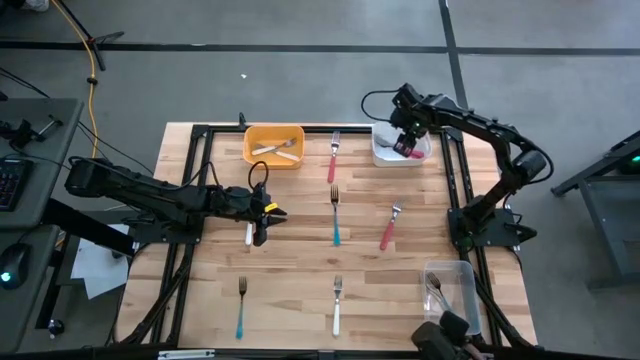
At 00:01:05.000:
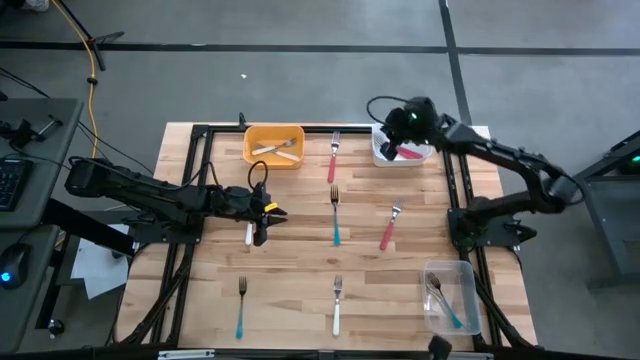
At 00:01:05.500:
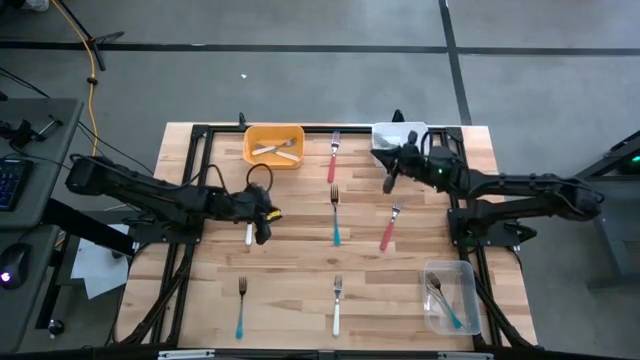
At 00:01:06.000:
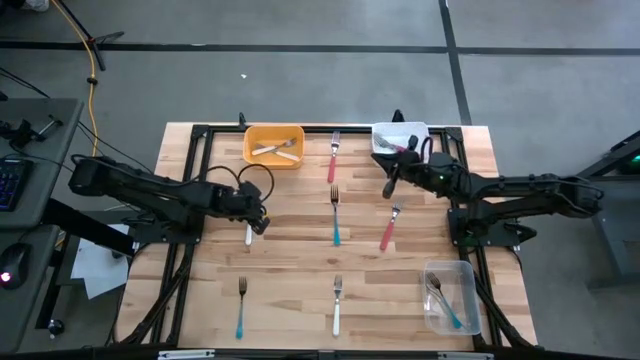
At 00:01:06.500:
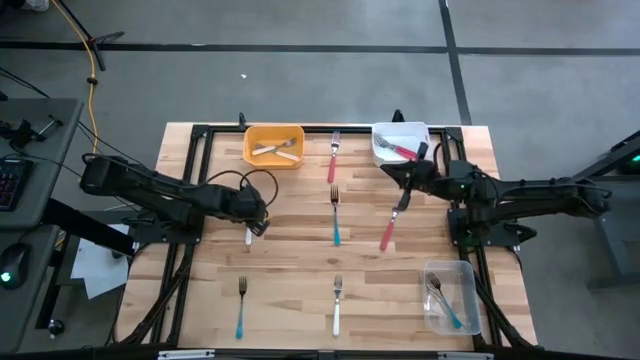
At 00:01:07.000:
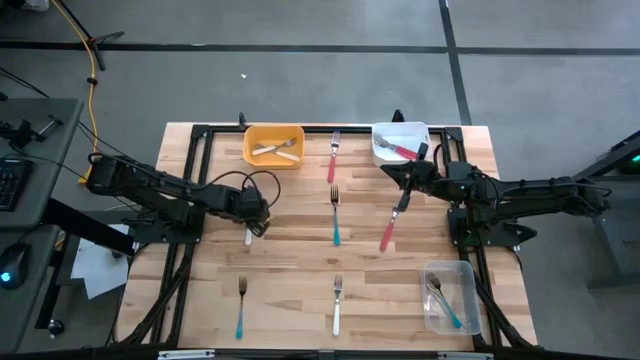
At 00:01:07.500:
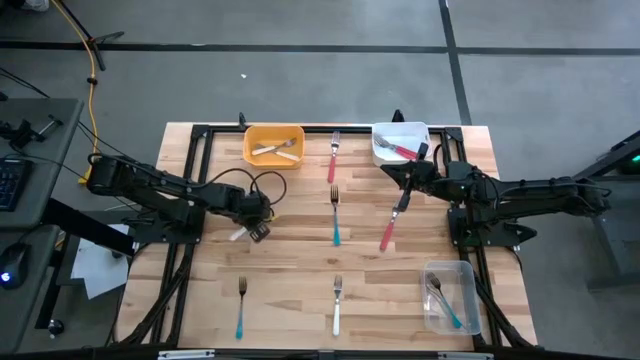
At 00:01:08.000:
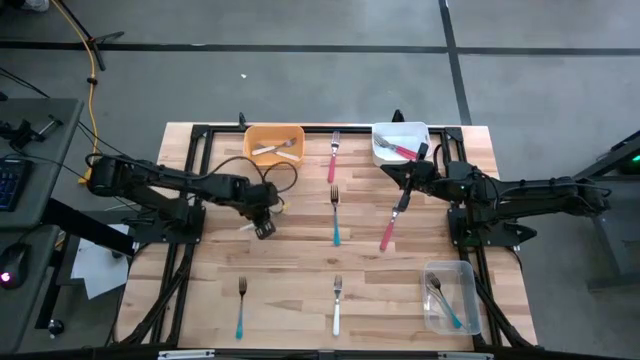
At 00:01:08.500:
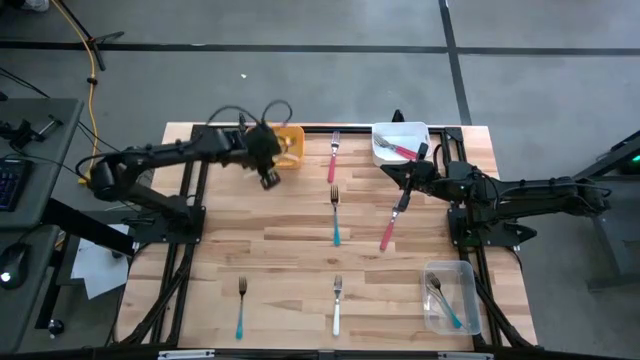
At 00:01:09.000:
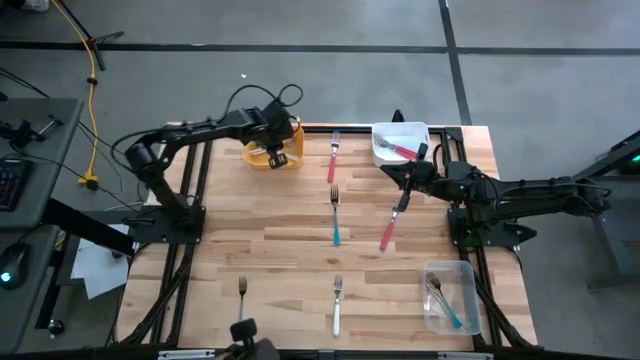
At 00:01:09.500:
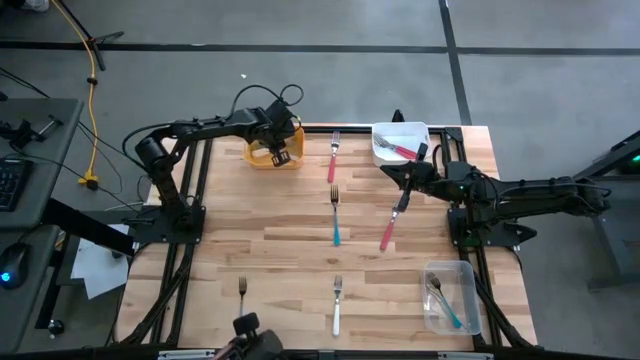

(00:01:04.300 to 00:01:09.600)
Task: Sort silverware by color (type)
Put the top white fork into the yellow bin

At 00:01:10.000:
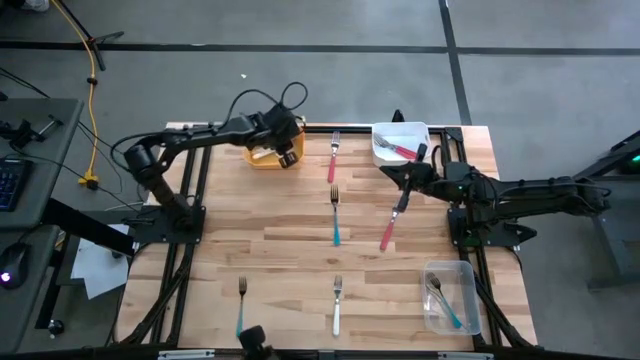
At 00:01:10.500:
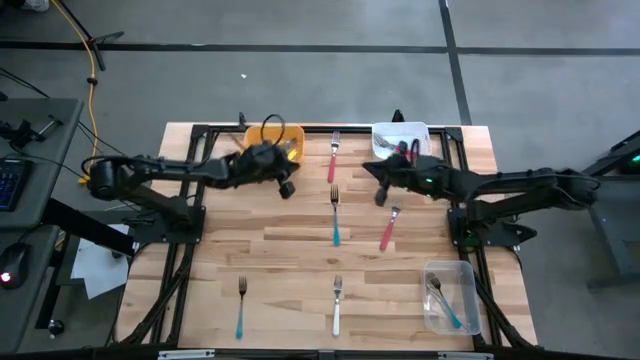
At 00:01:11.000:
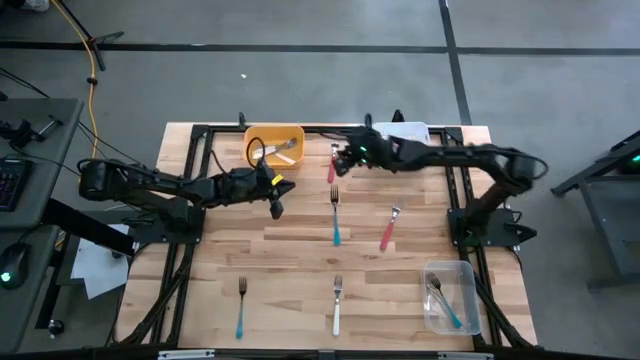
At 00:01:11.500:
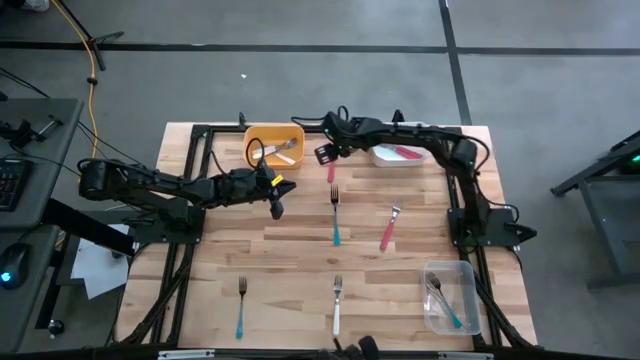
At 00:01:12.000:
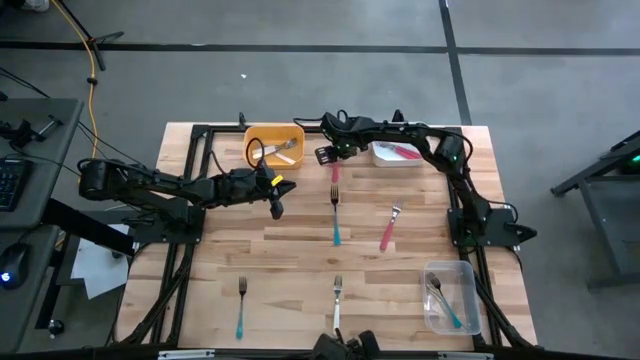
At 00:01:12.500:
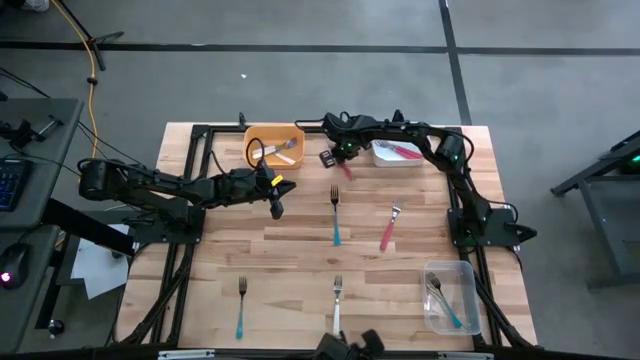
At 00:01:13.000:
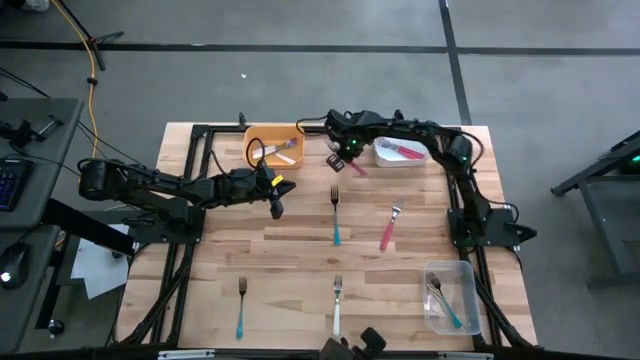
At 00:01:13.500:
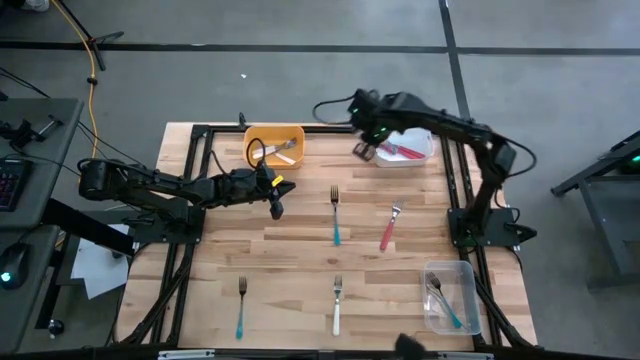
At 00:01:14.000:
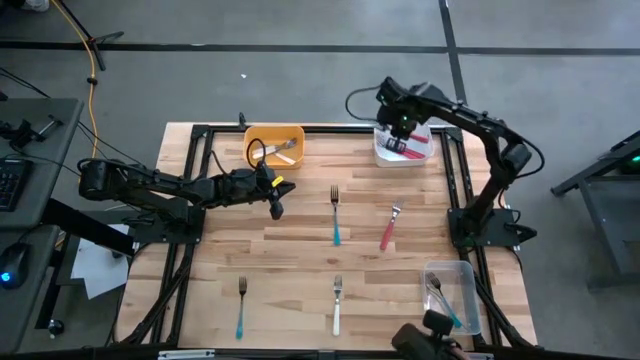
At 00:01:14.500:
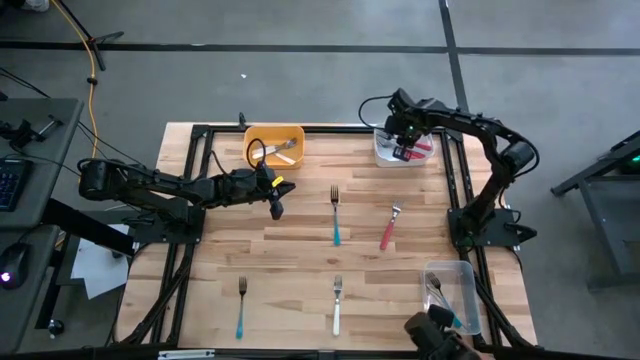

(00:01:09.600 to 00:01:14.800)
Put the top pink fork into the white bin

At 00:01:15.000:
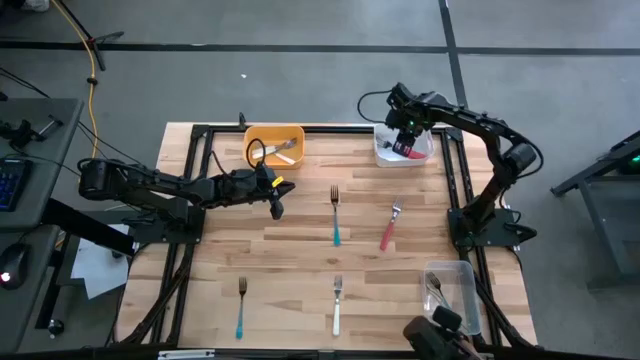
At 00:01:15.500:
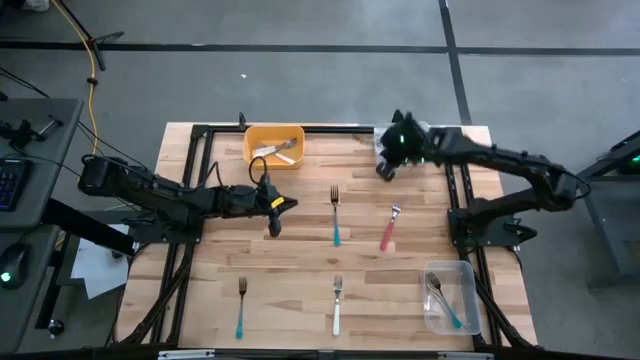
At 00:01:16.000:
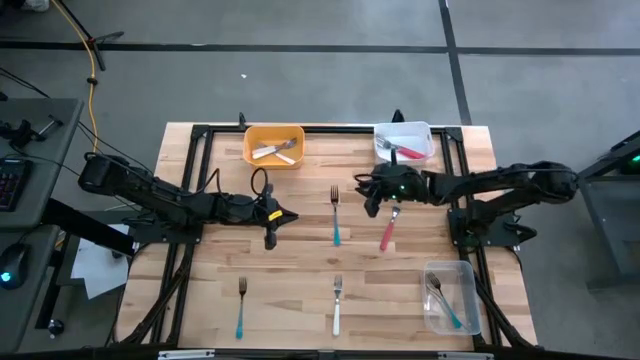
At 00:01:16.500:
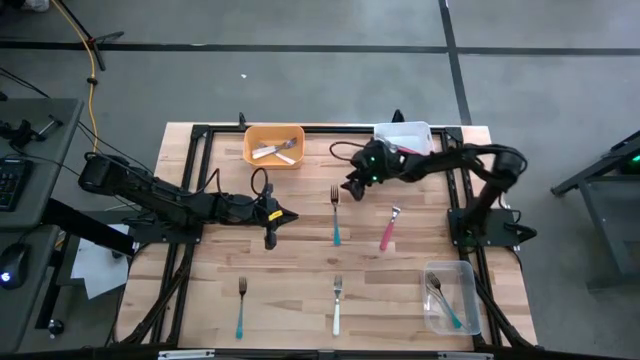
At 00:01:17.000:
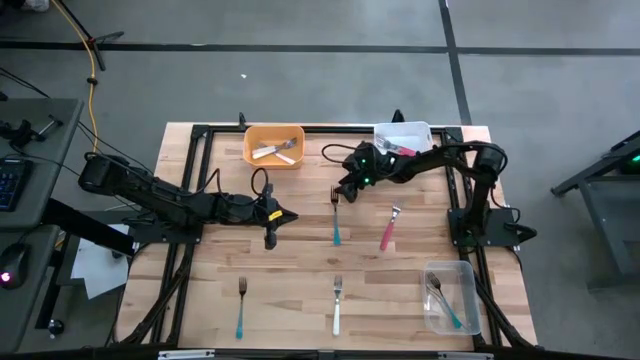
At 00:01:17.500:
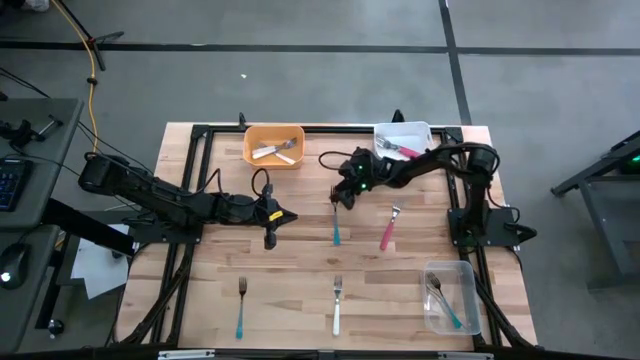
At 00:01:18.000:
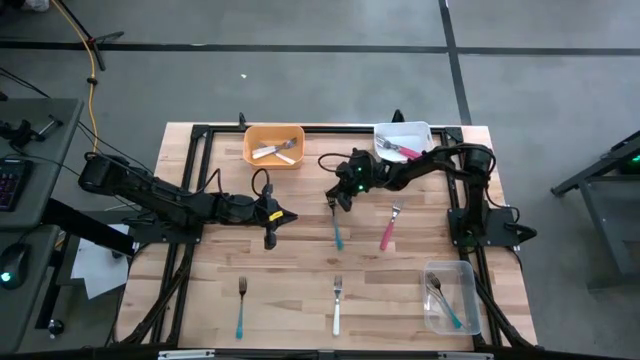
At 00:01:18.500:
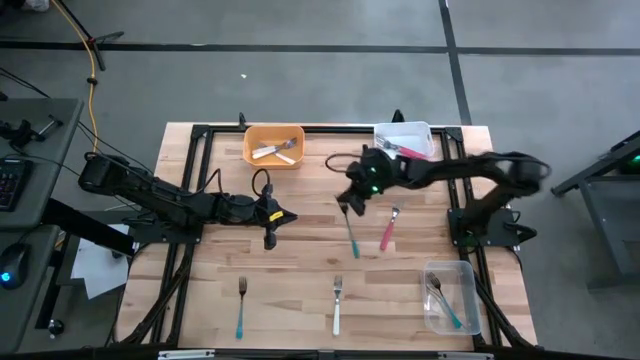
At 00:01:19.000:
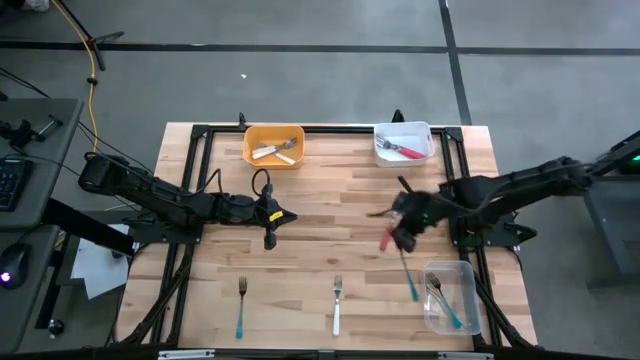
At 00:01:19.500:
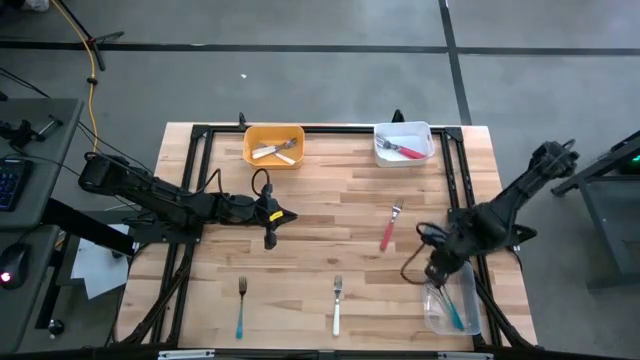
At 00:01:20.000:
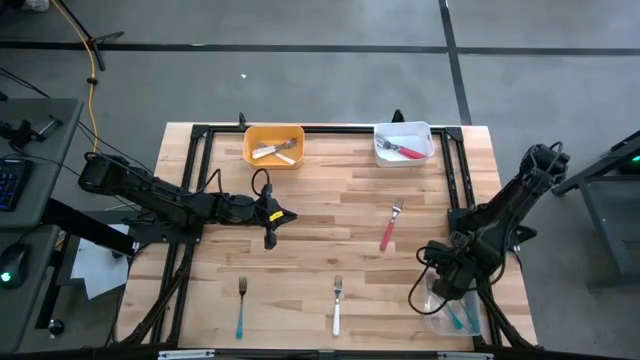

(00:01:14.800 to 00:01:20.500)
Put the top blue fork into the transparent bin

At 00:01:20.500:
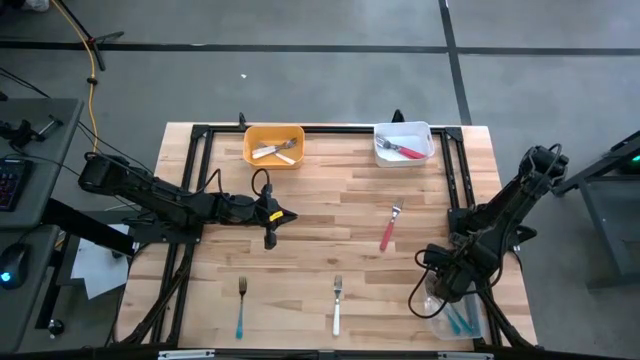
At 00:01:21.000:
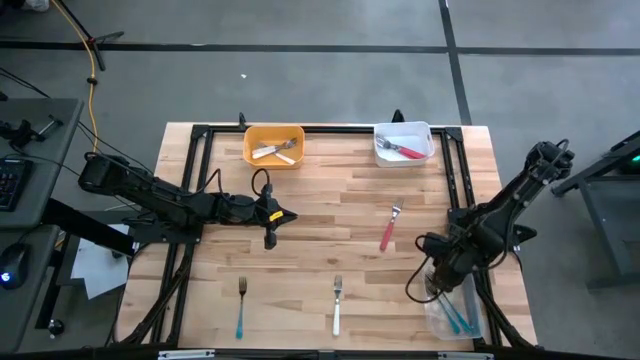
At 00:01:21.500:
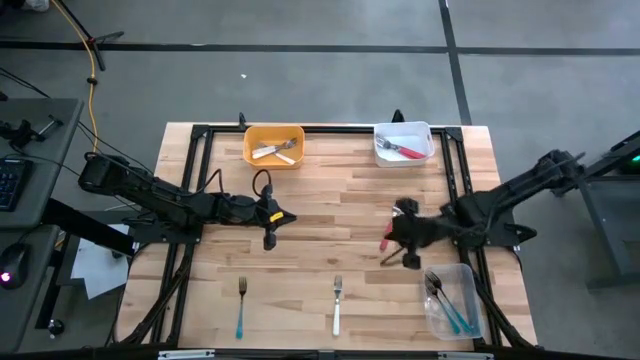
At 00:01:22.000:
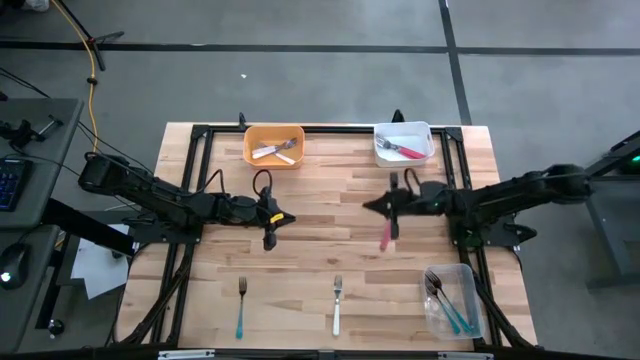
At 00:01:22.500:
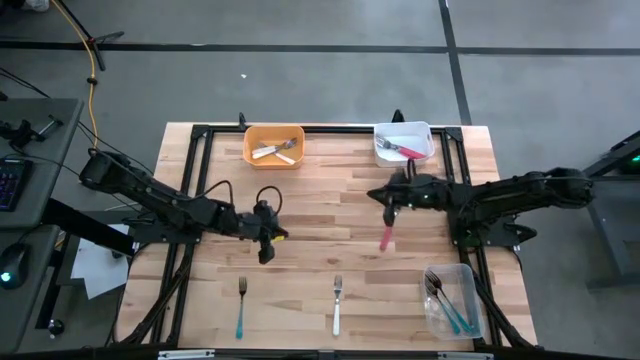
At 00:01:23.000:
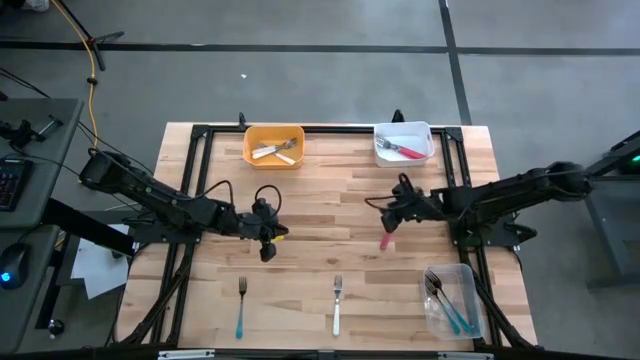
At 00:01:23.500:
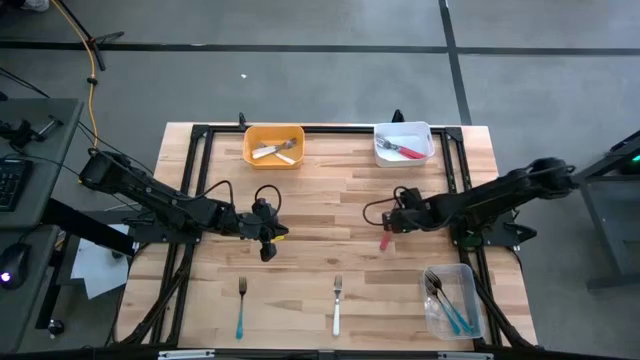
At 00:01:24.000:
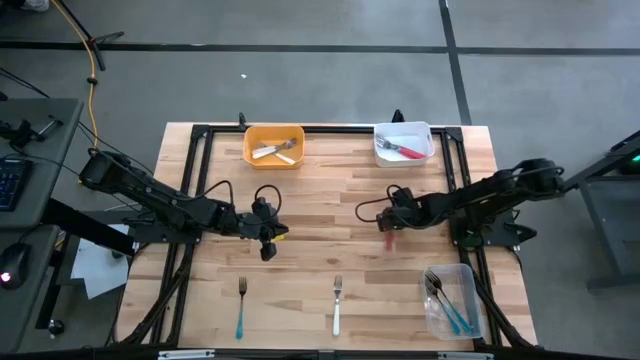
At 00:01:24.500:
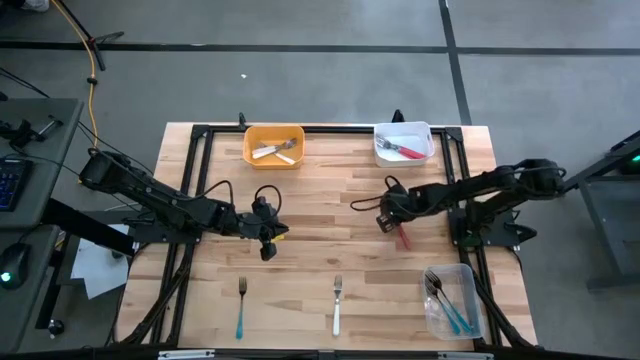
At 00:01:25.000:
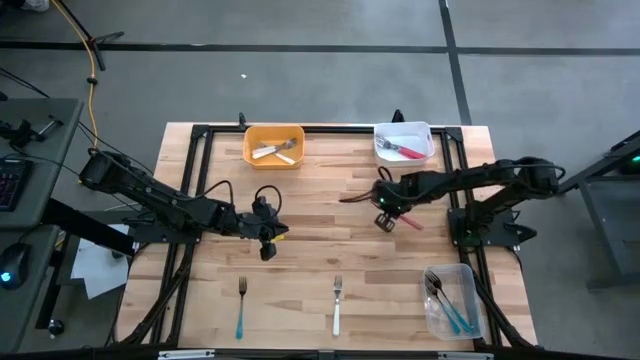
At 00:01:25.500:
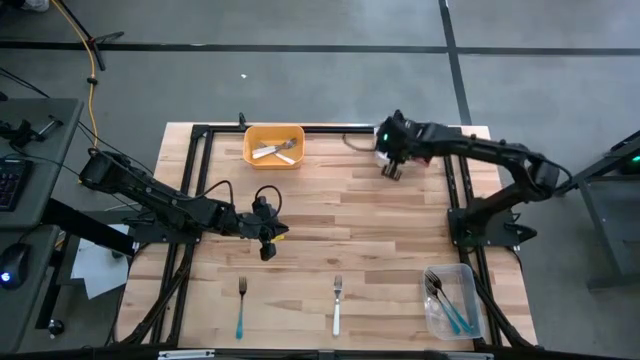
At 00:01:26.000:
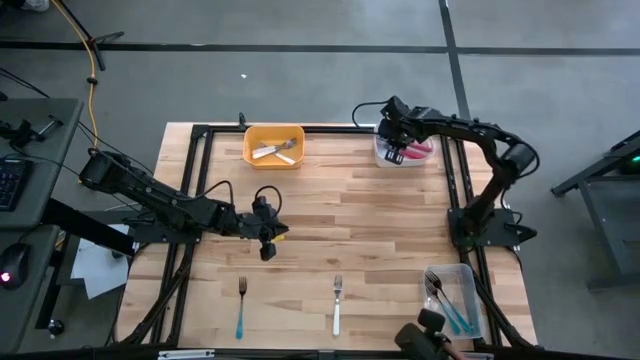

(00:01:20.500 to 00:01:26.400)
Put the pink fork into the white bin
